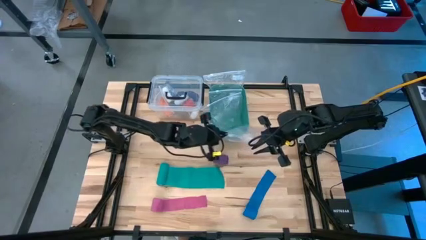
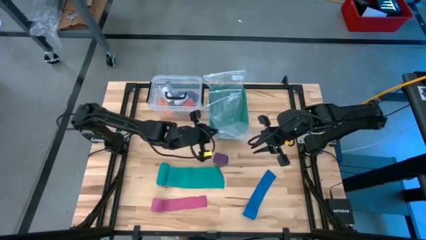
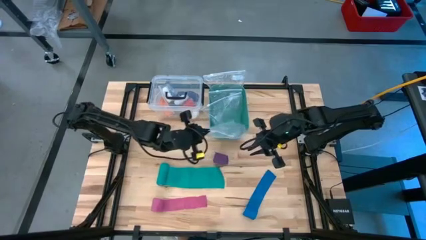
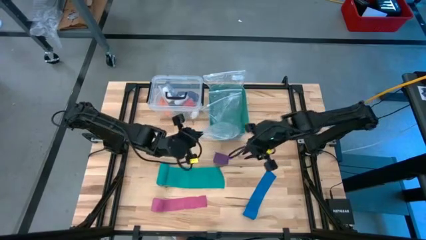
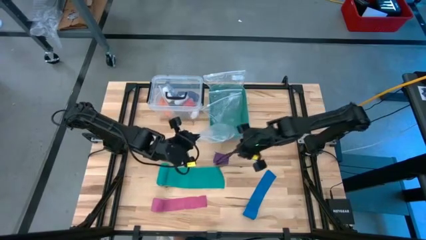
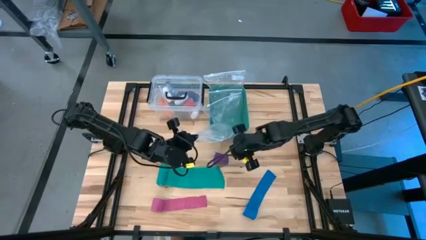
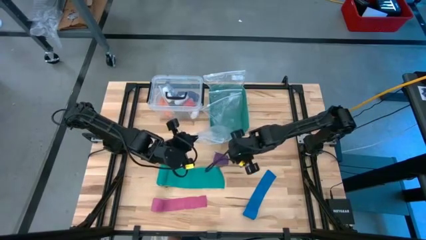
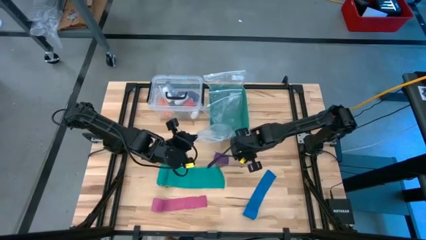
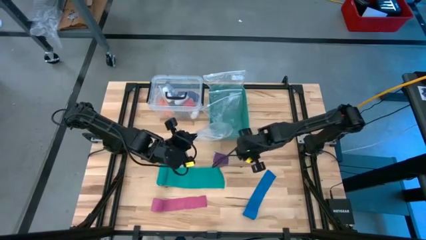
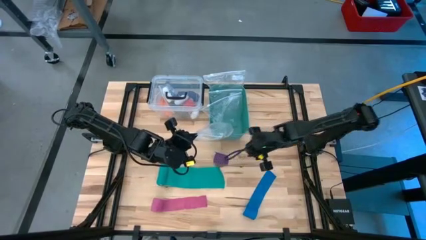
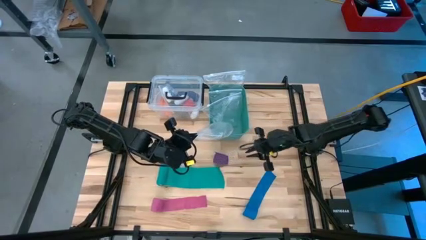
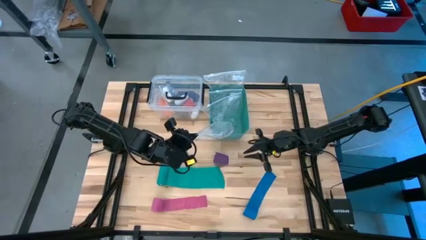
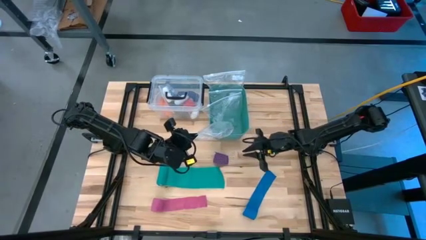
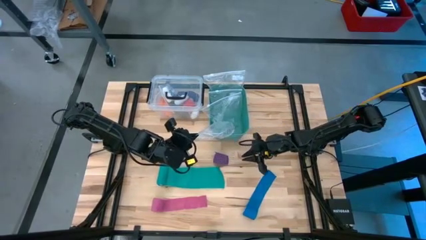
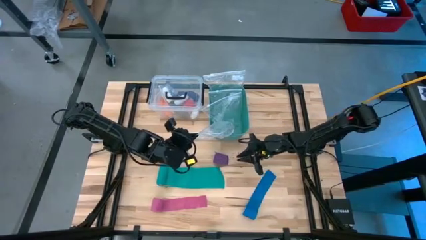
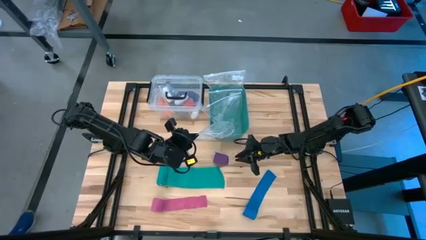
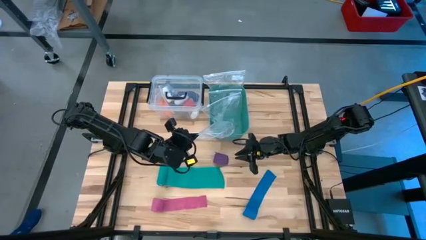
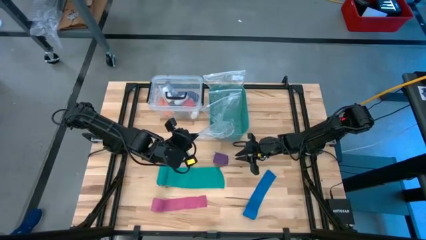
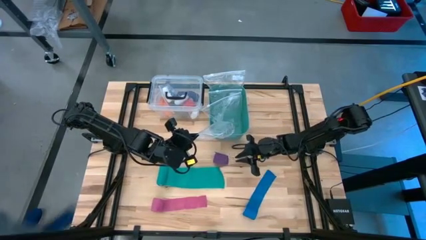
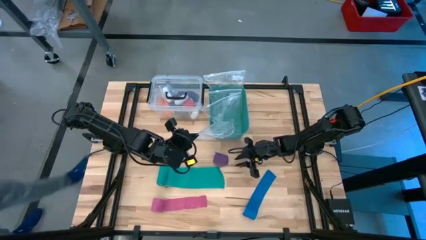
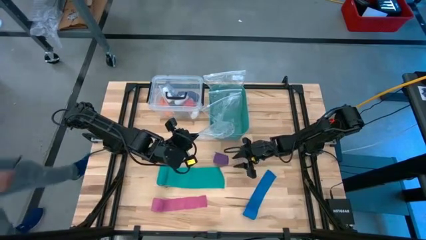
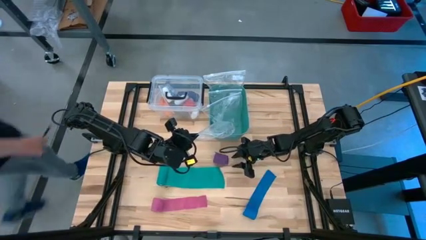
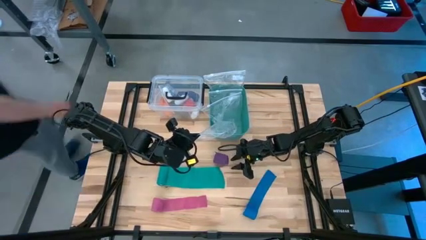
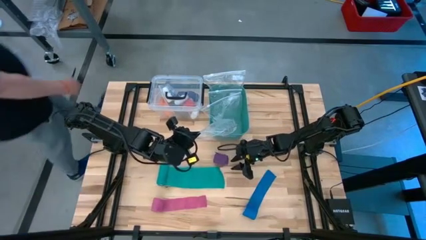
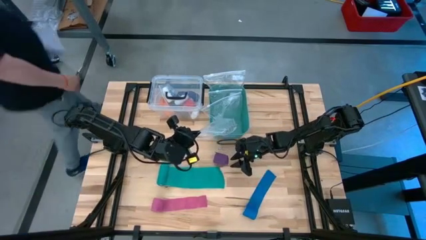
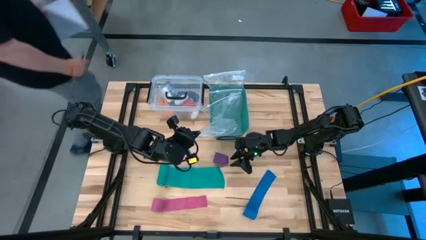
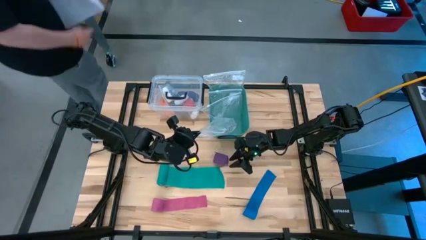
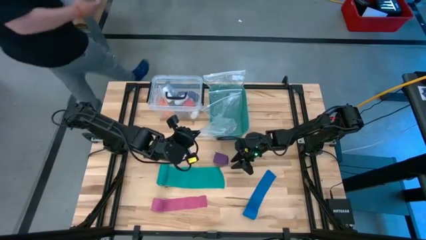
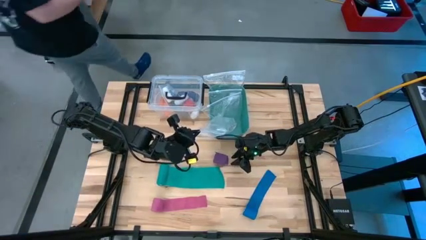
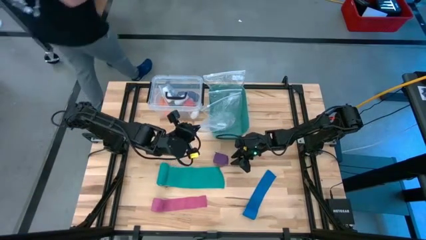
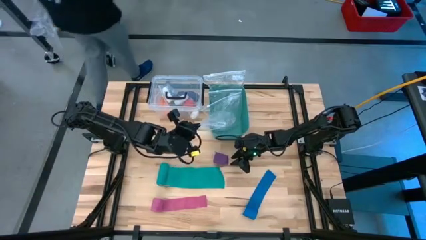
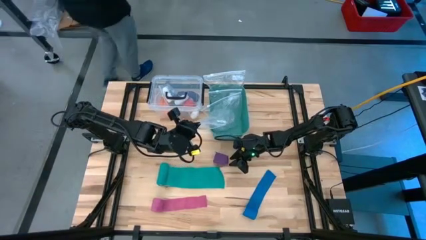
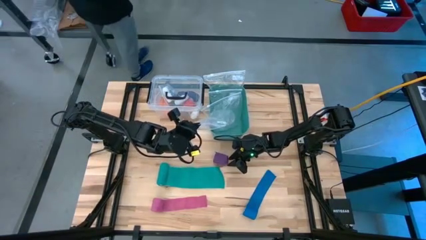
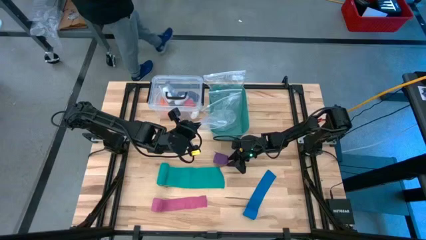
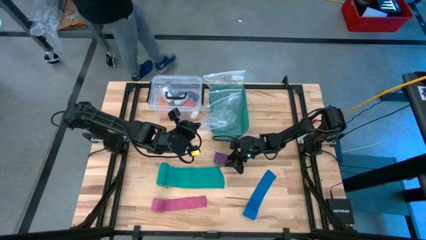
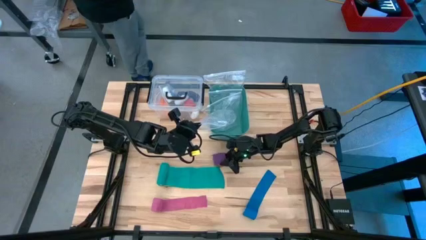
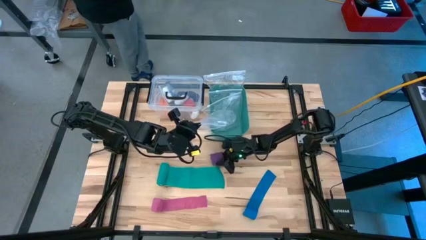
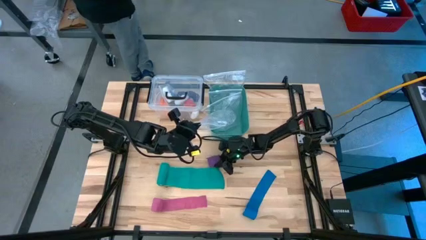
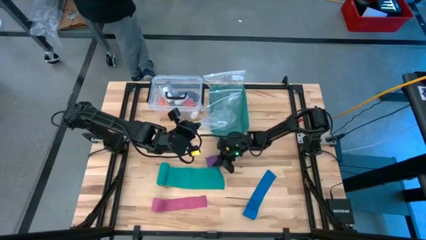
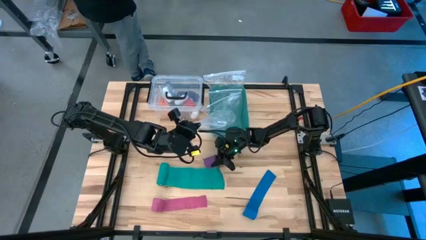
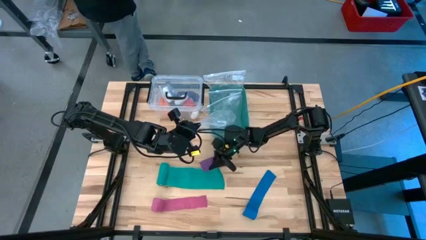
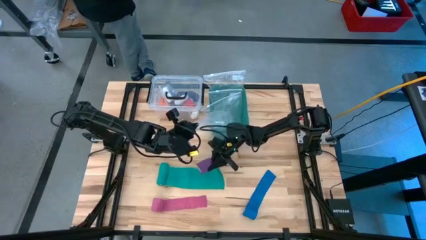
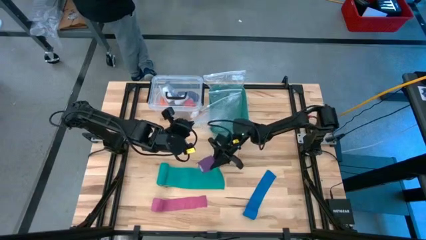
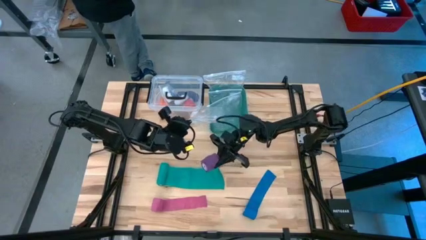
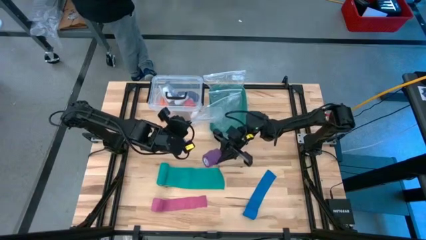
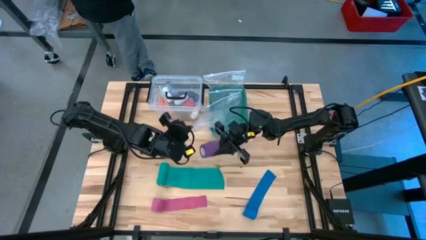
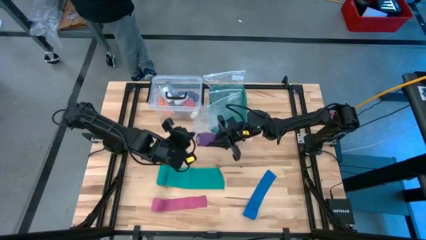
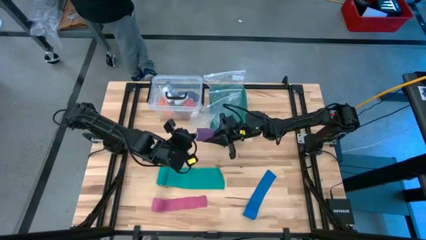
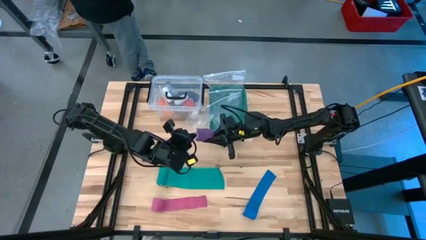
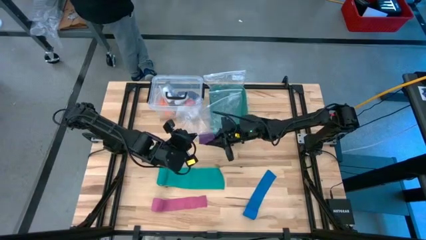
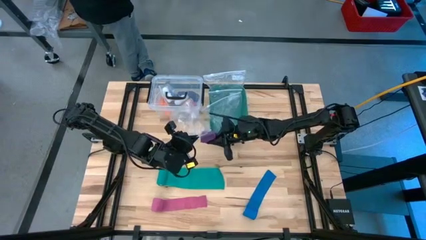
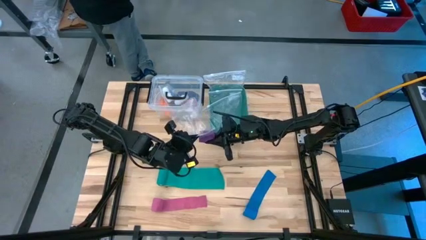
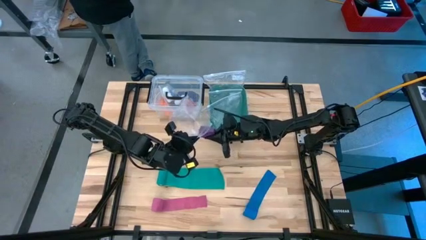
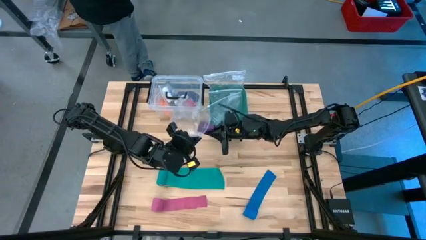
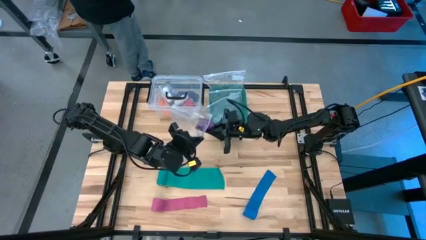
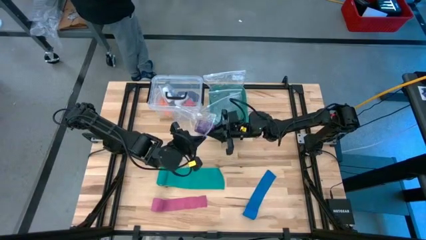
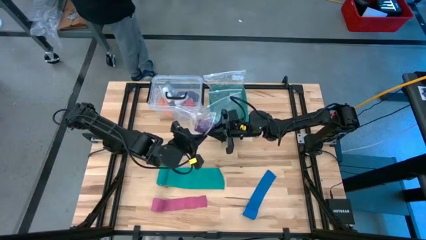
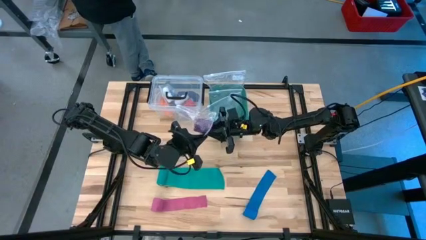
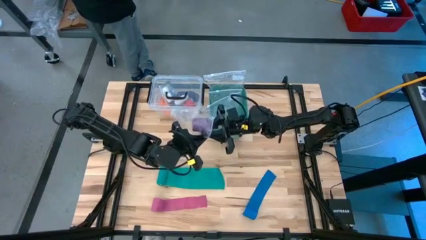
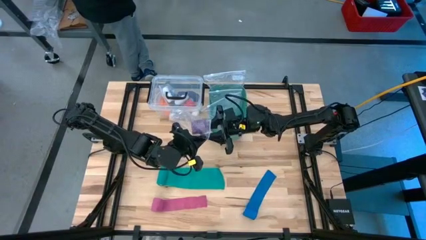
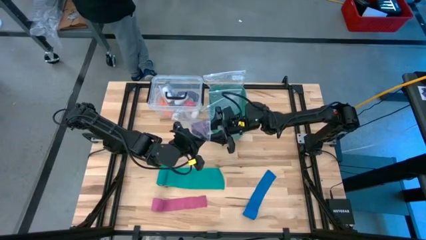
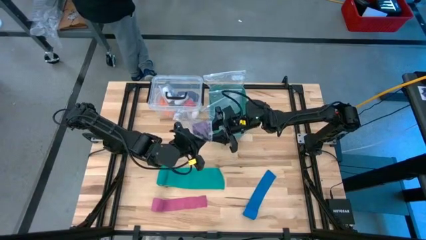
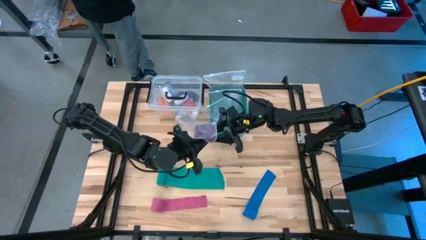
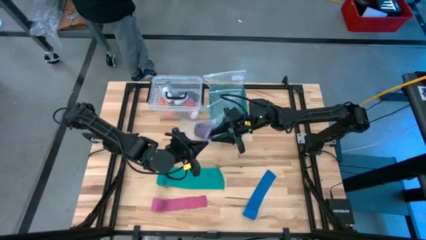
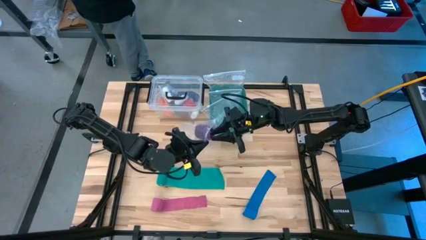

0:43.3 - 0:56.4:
Task: Roll bandage
Insert the purple bandage into the transparent zip bag

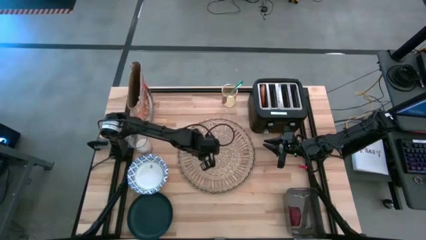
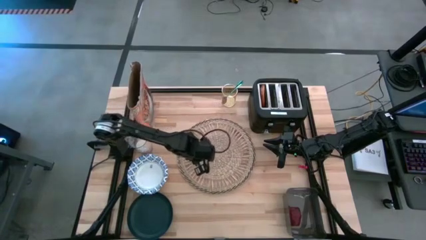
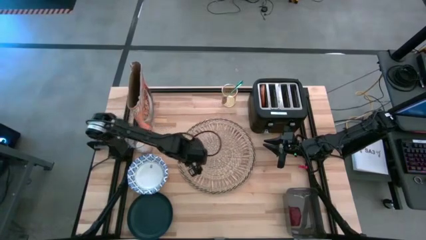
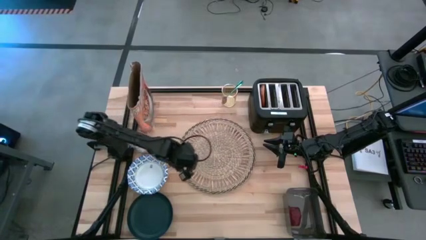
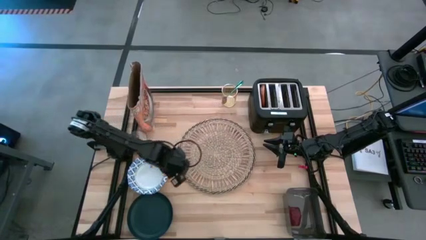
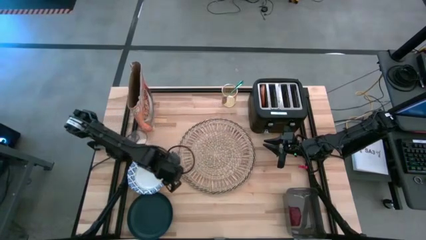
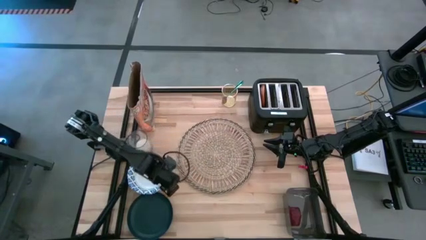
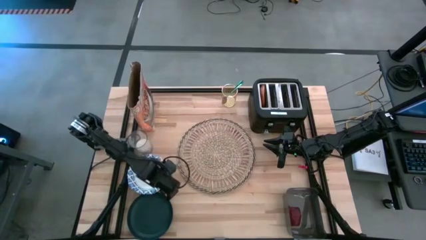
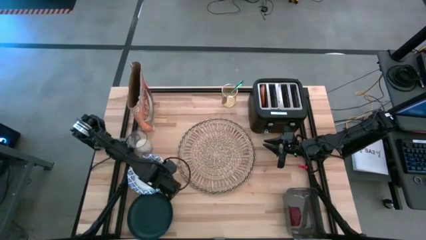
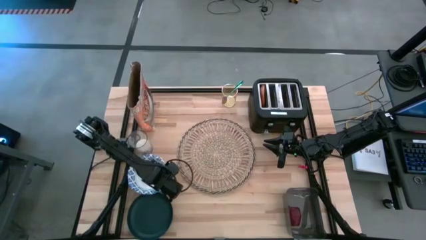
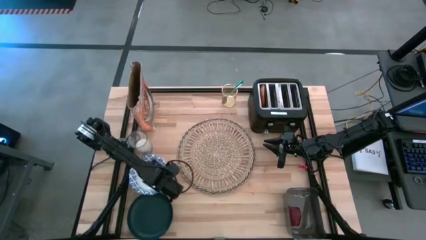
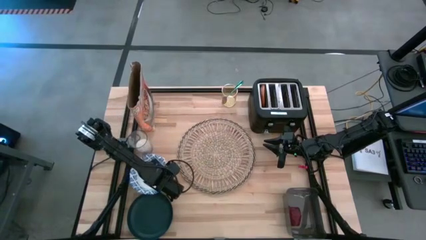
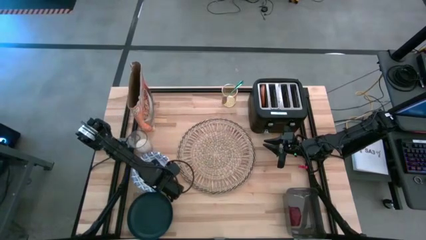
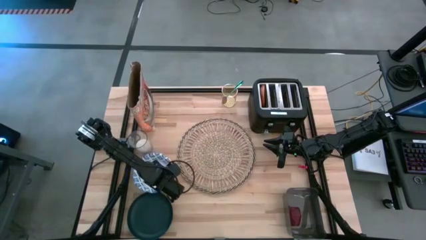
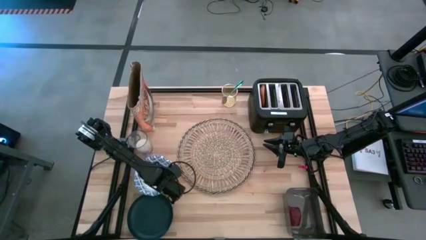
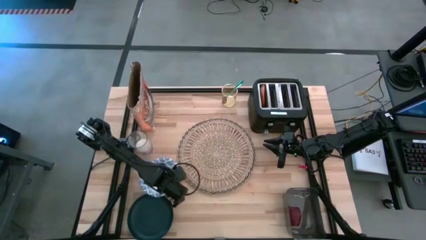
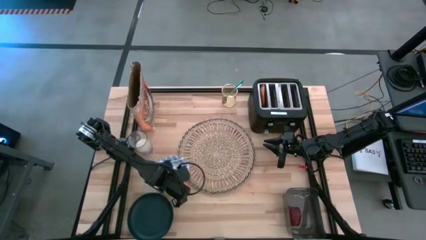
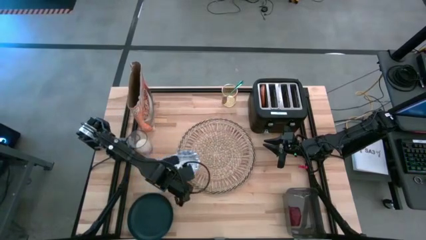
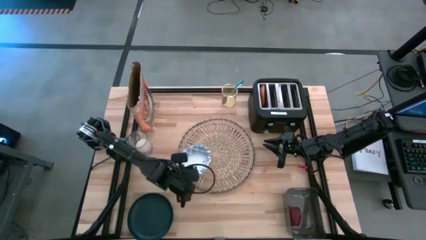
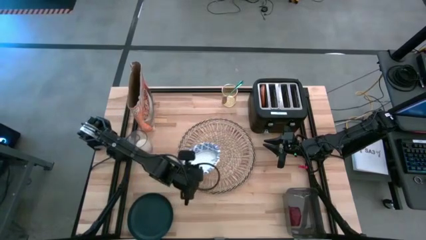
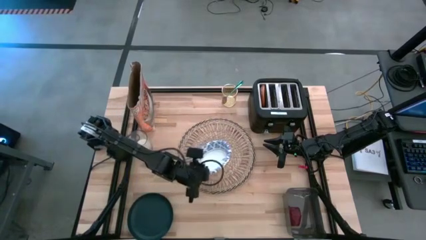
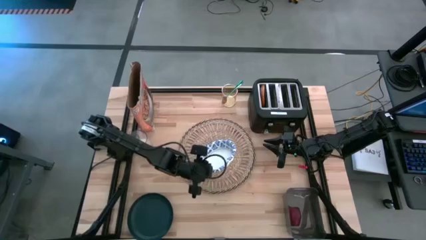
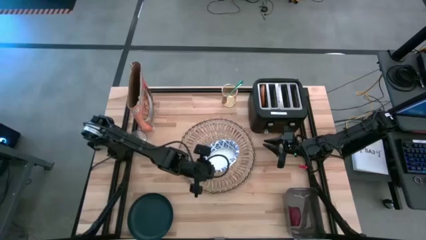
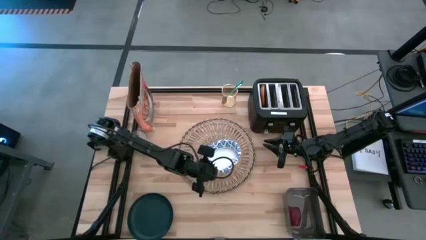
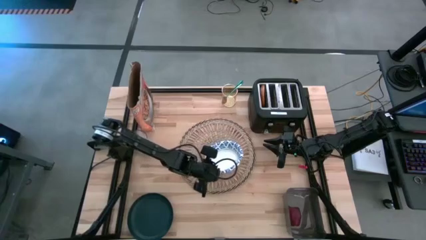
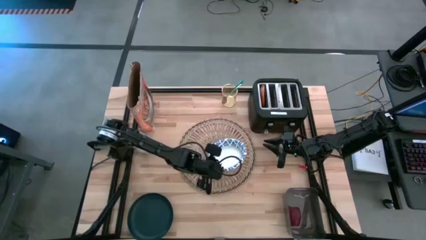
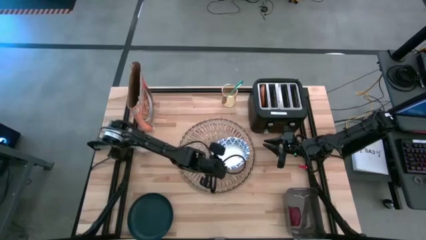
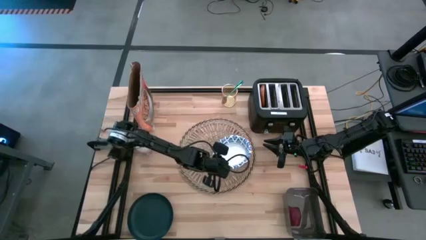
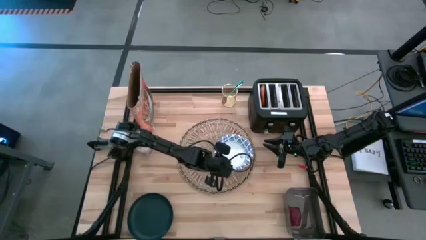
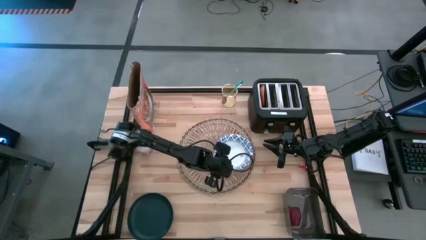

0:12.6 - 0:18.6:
Task: Arrange a breakfast setting
Put the white bowl on the brown placemat
